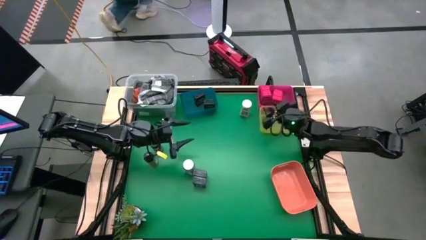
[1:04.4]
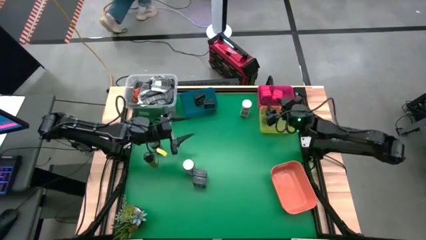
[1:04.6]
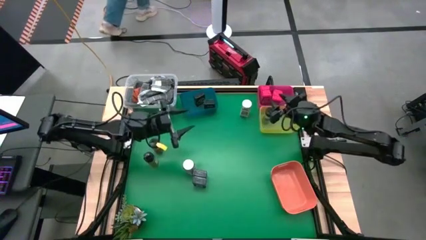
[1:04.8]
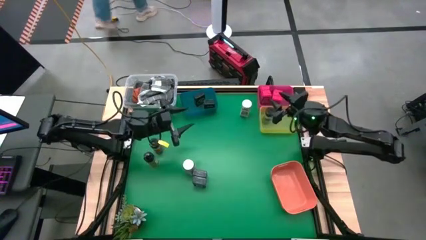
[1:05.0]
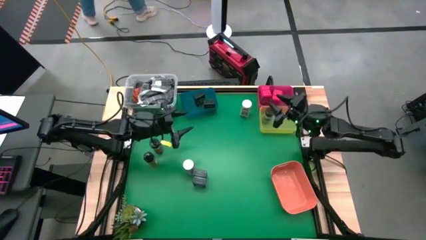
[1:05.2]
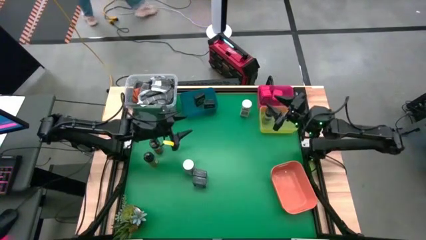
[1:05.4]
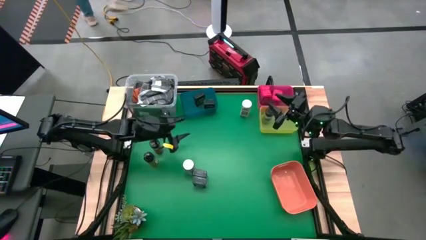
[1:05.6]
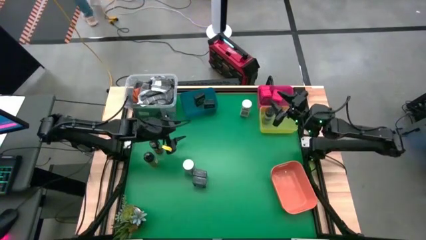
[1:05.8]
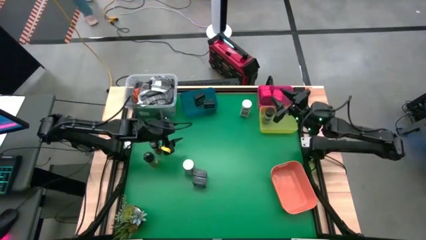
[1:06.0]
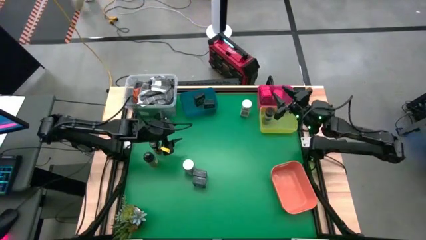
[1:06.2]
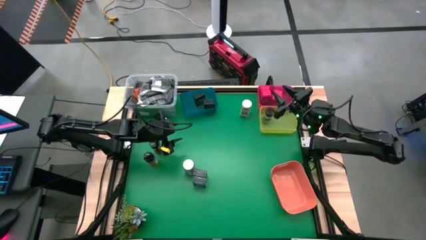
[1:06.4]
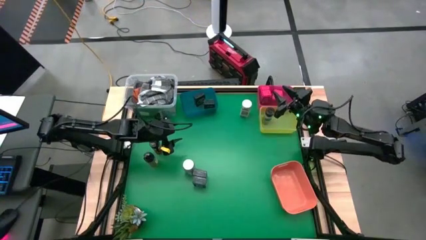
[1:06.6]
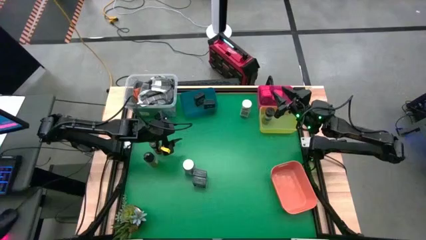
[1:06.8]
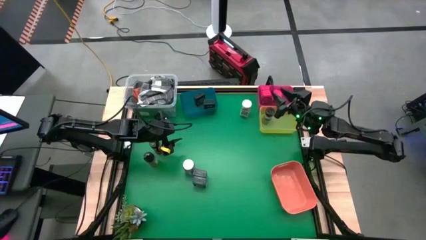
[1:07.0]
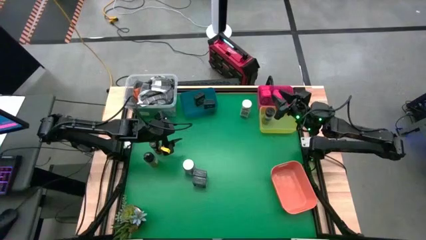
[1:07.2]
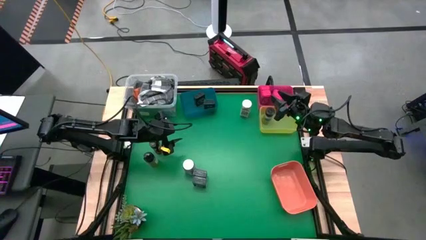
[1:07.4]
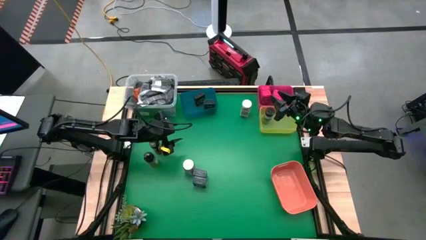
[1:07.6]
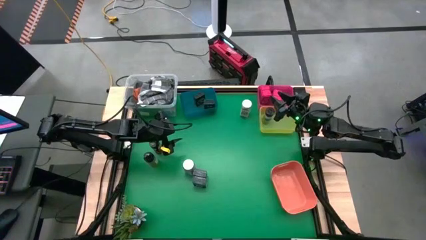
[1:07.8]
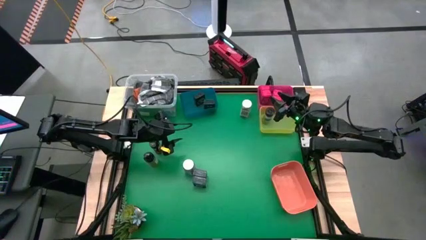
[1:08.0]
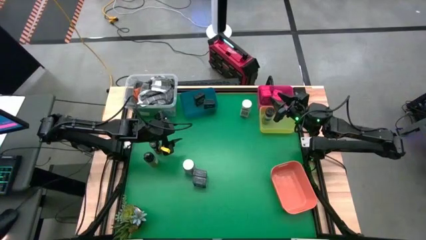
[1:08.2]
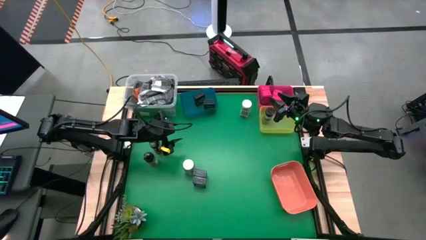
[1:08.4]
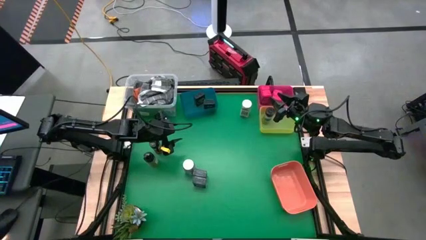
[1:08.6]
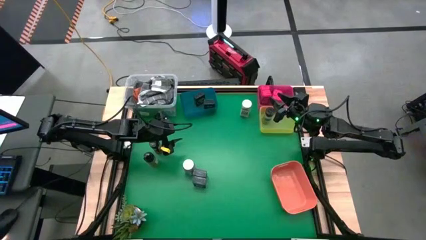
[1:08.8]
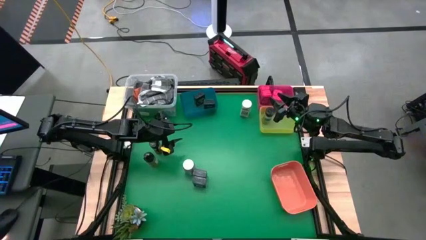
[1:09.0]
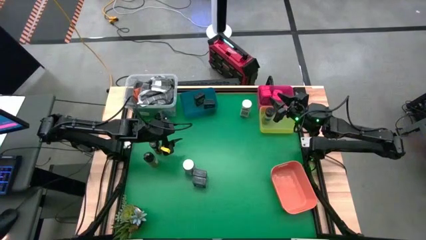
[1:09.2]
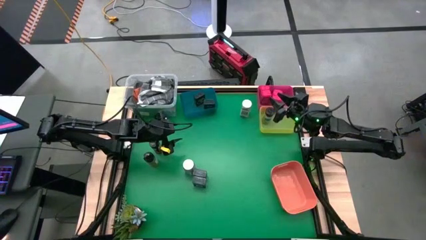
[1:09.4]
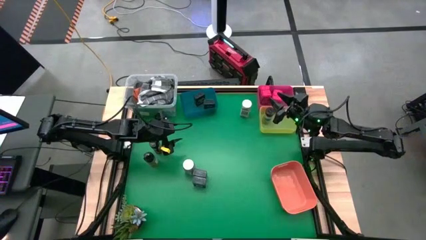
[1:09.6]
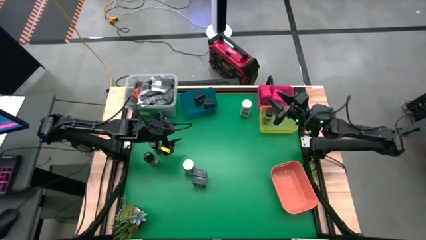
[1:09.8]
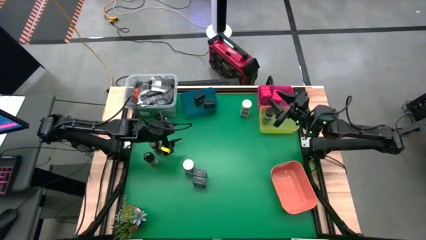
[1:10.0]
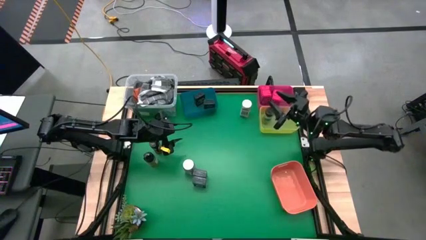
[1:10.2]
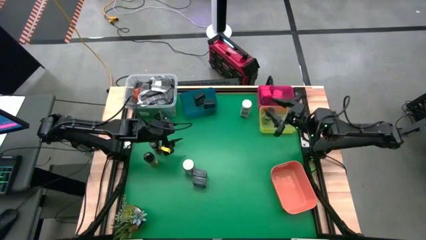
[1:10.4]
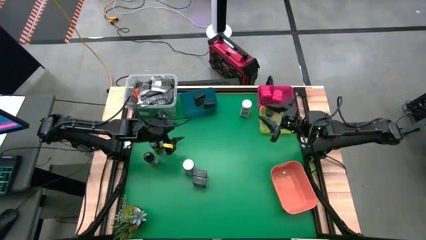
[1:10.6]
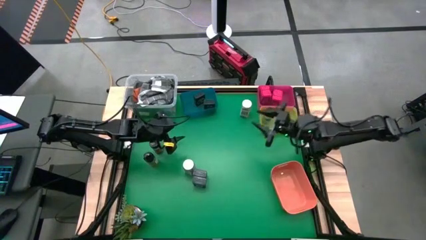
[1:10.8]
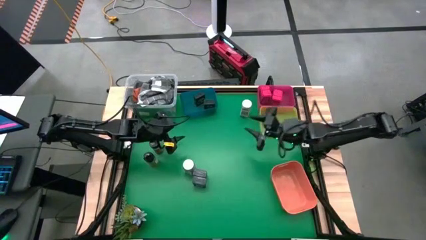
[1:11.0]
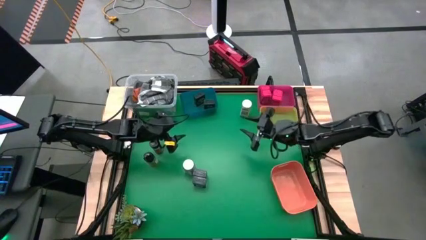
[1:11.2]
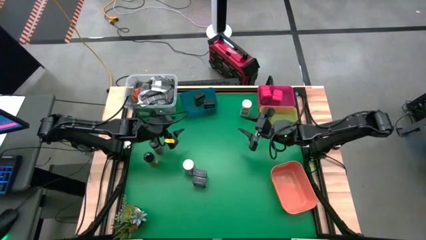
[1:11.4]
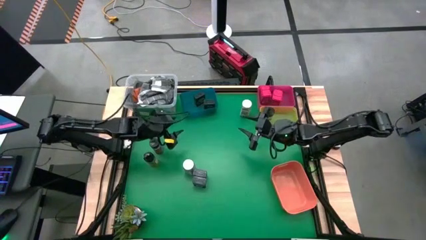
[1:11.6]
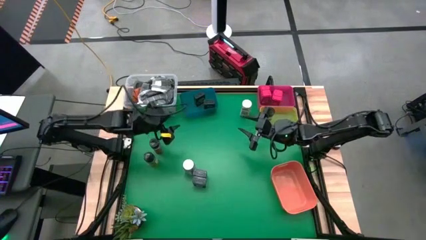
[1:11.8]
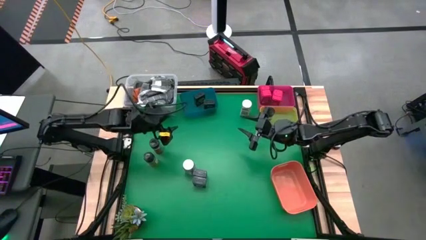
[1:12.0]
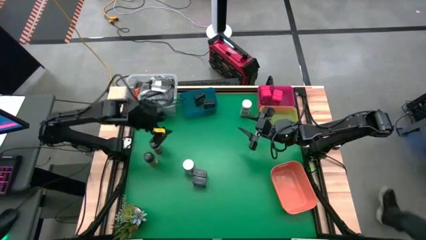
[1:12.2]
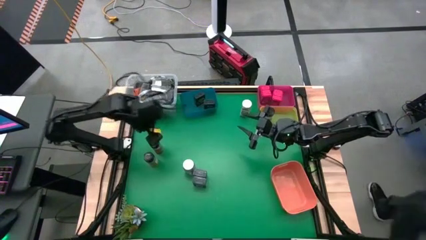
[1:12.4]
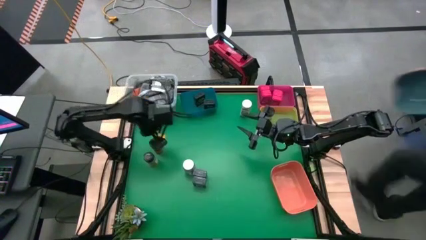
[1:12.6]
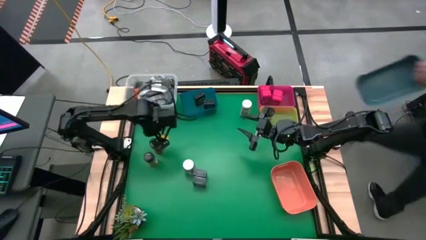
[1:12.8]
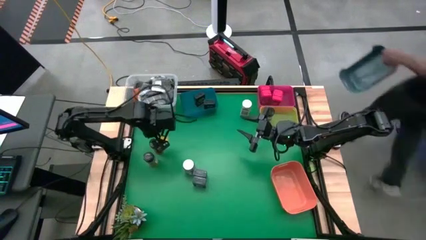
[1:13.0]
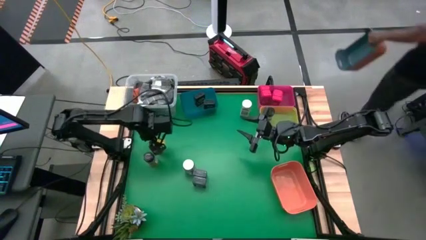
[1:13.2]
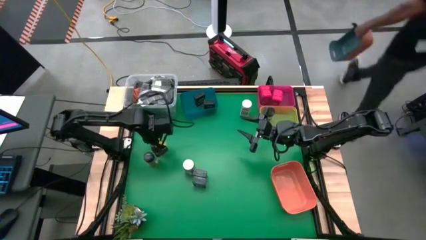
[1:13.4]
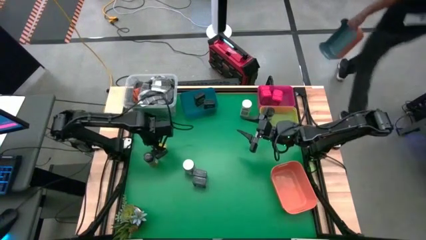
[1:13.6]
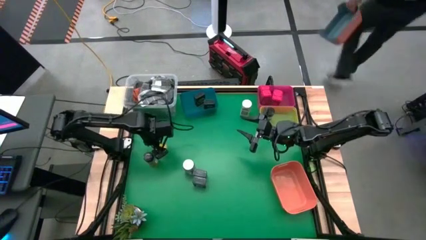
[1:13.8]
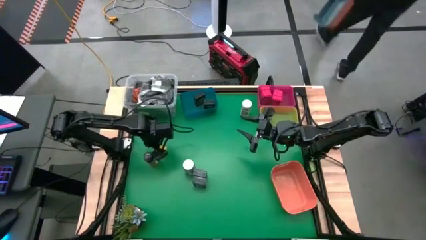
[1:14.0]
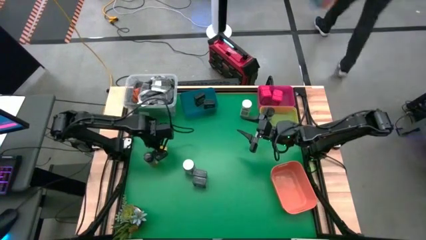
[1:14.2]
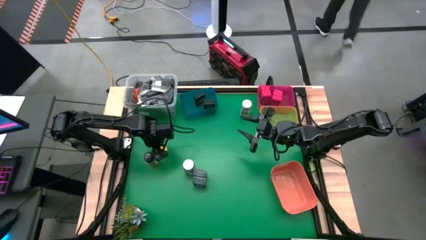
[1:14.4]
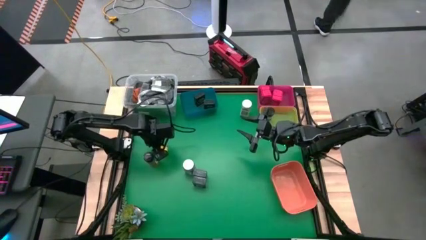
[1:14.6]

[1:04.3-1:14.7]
Task: Sort spices by type
Put the black seasoning from the middle left into the yellow bin
